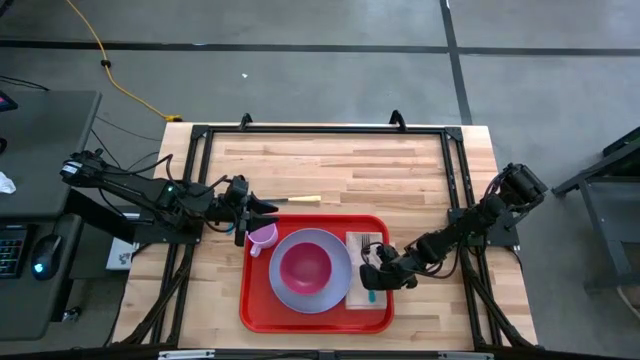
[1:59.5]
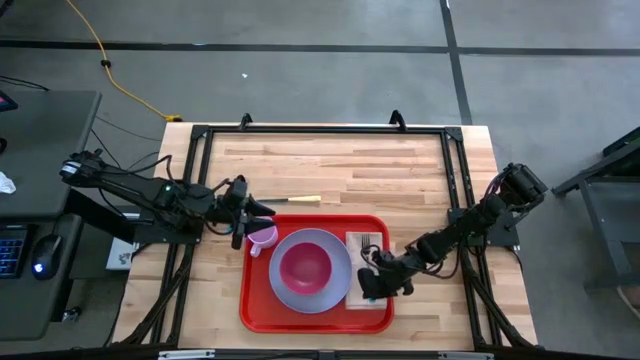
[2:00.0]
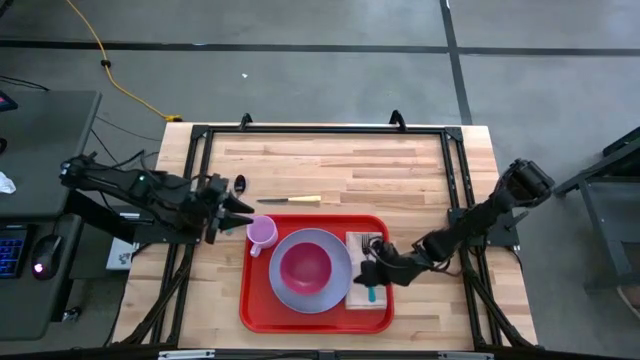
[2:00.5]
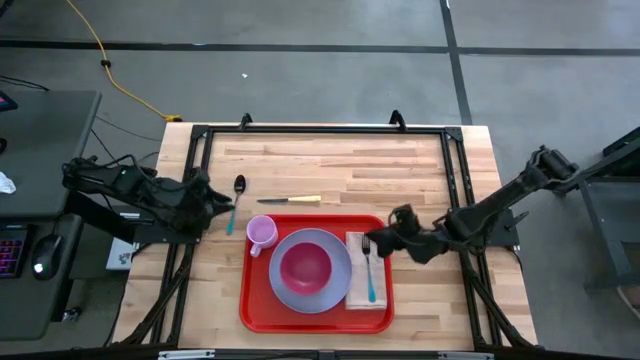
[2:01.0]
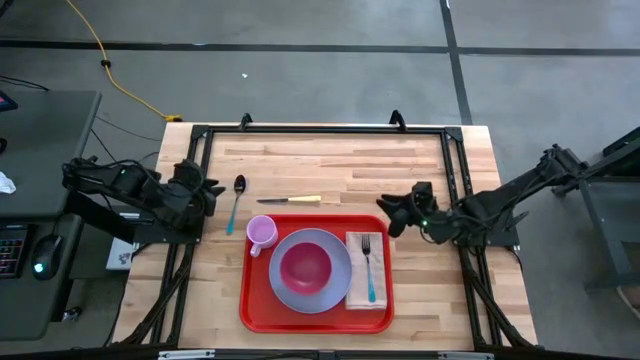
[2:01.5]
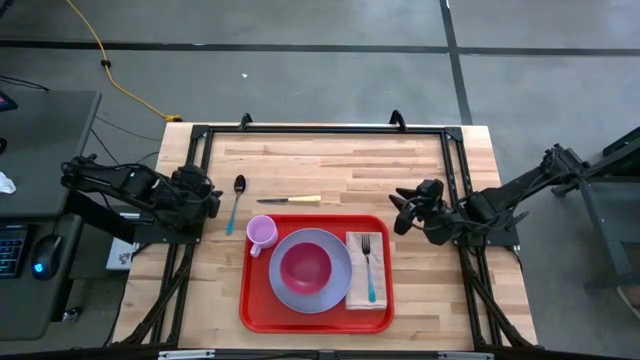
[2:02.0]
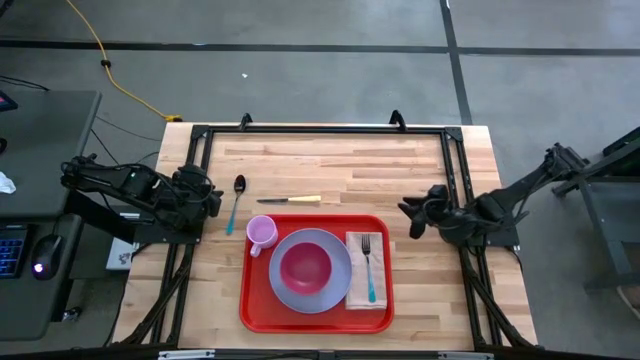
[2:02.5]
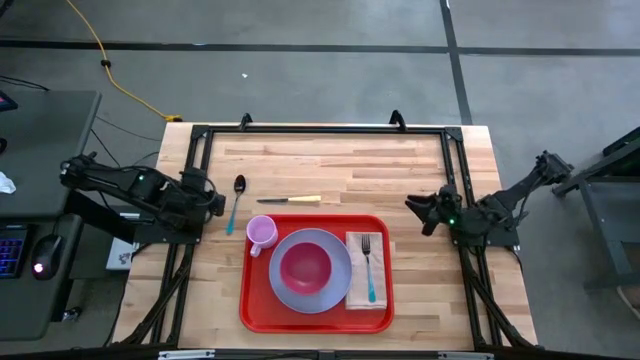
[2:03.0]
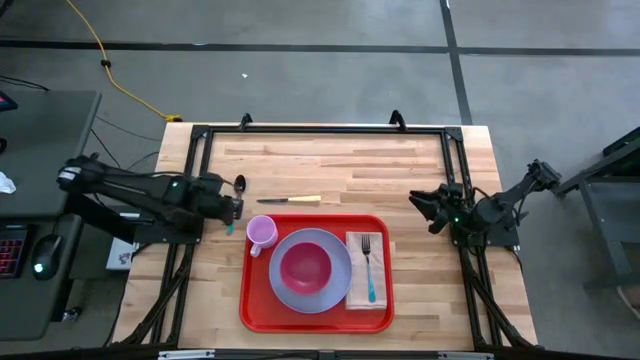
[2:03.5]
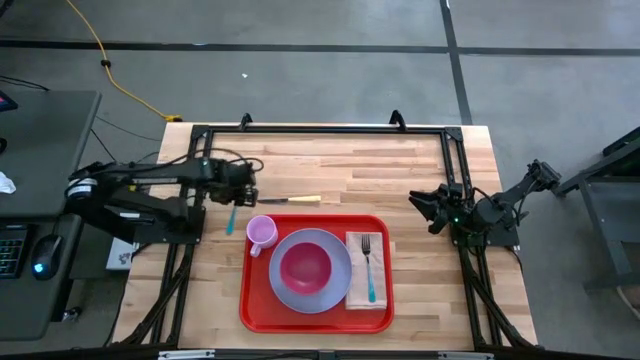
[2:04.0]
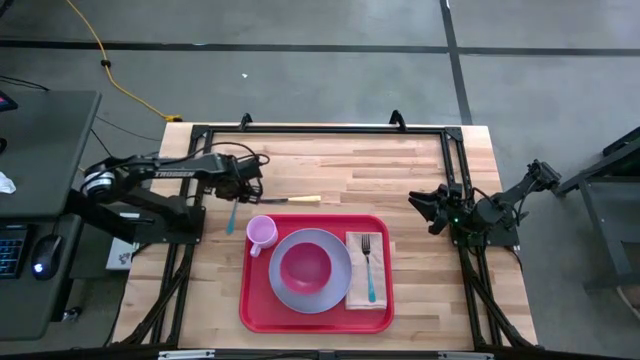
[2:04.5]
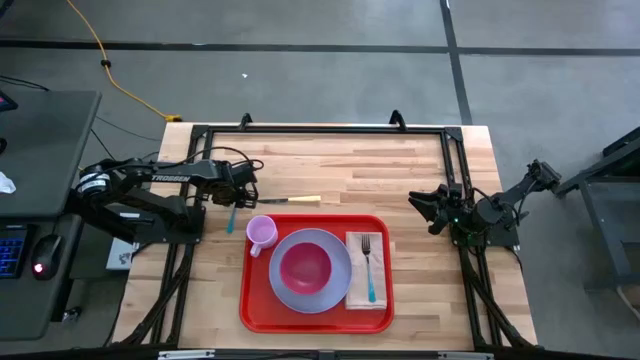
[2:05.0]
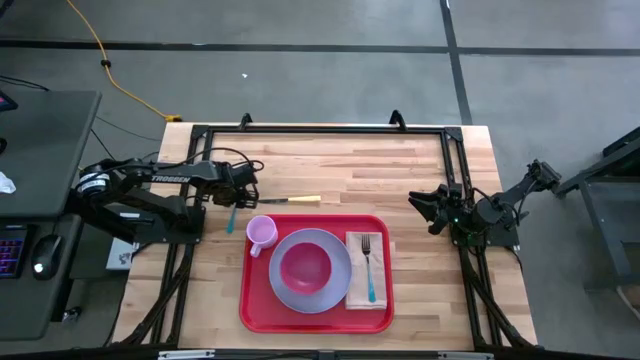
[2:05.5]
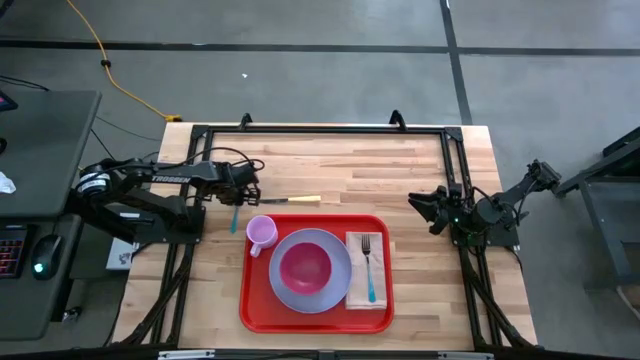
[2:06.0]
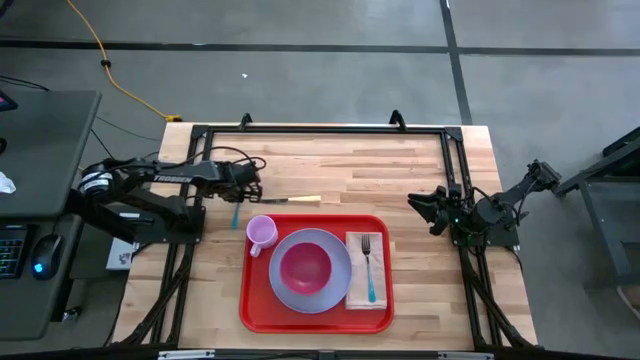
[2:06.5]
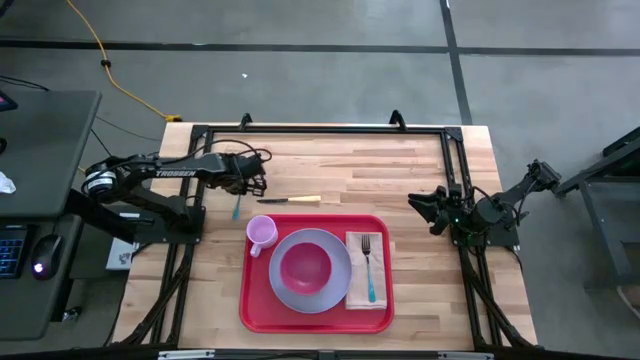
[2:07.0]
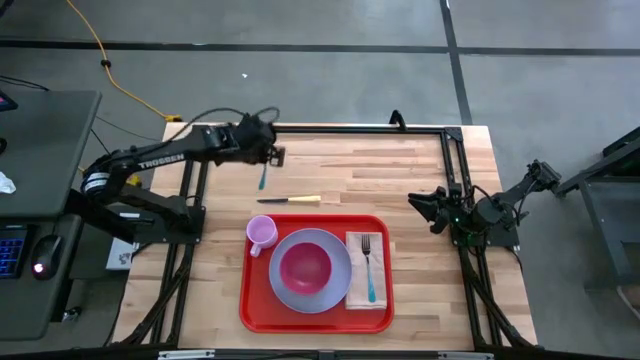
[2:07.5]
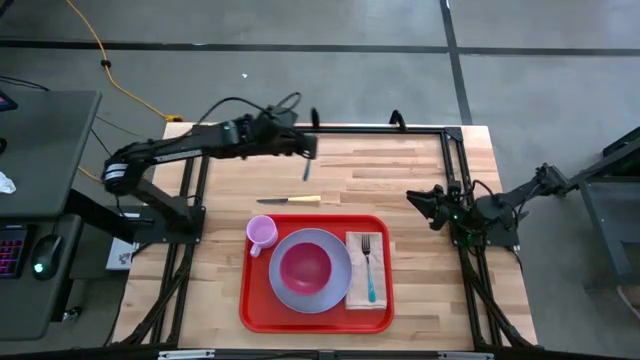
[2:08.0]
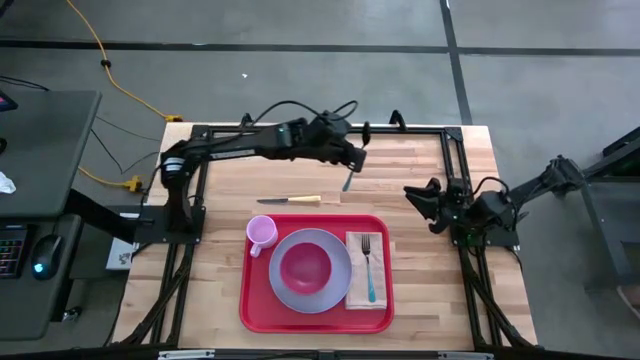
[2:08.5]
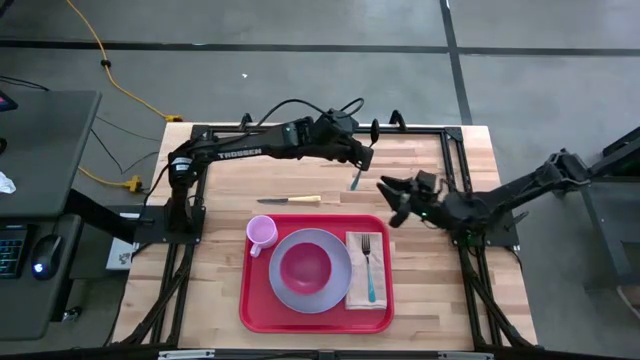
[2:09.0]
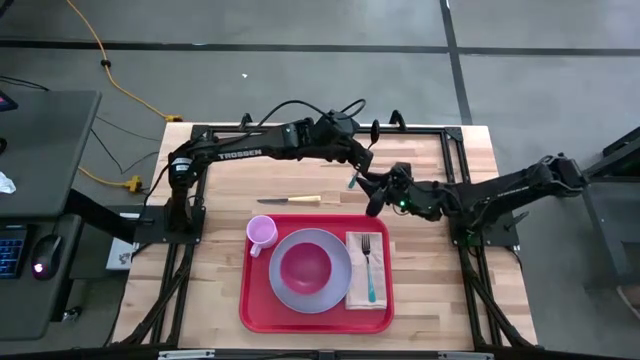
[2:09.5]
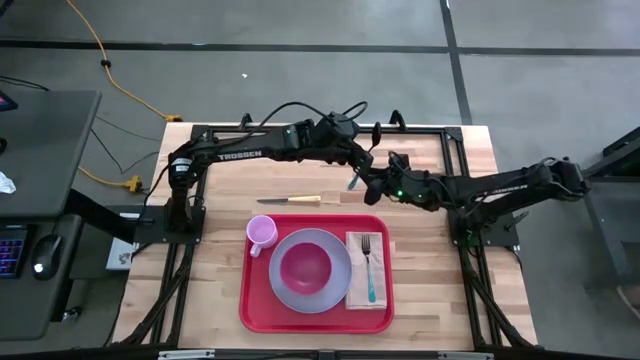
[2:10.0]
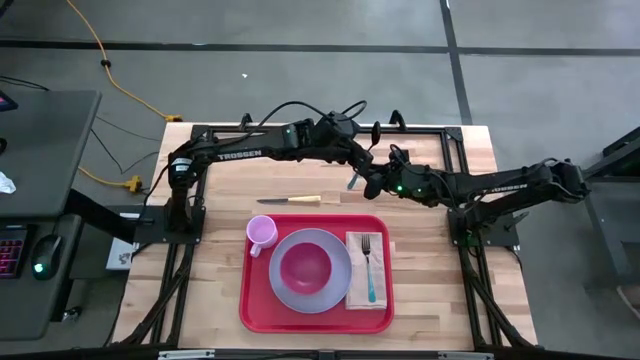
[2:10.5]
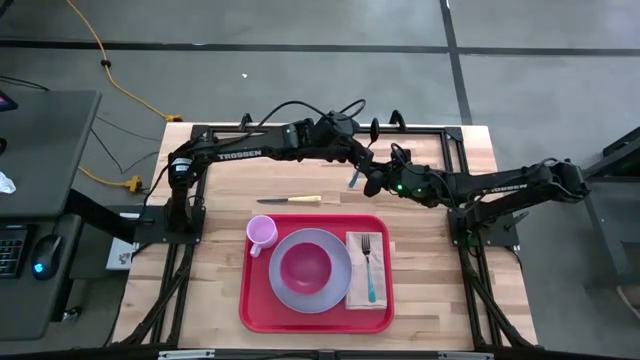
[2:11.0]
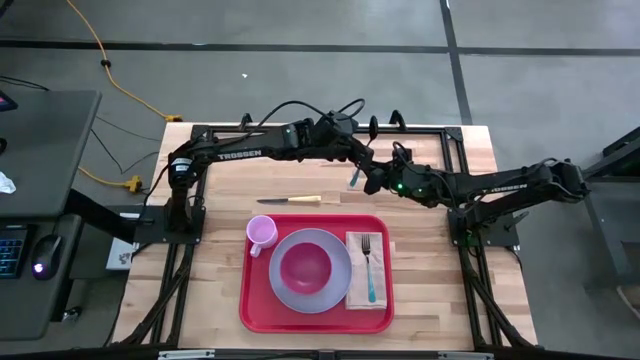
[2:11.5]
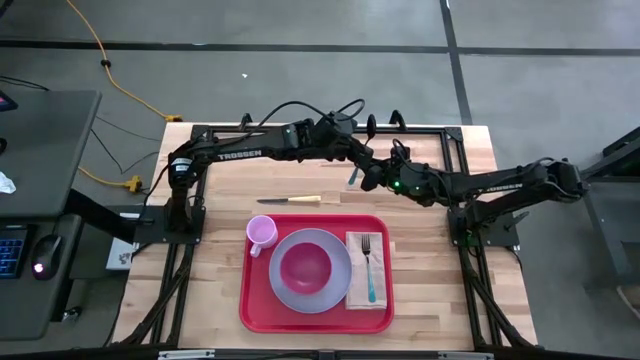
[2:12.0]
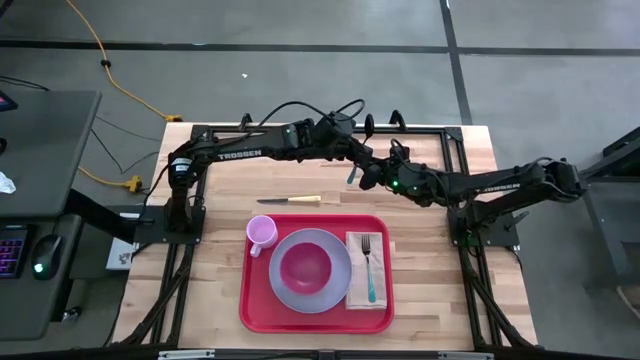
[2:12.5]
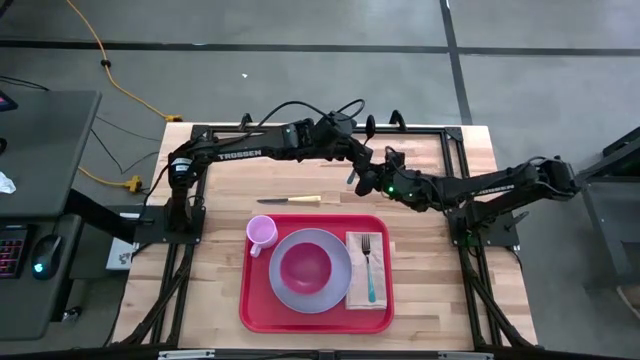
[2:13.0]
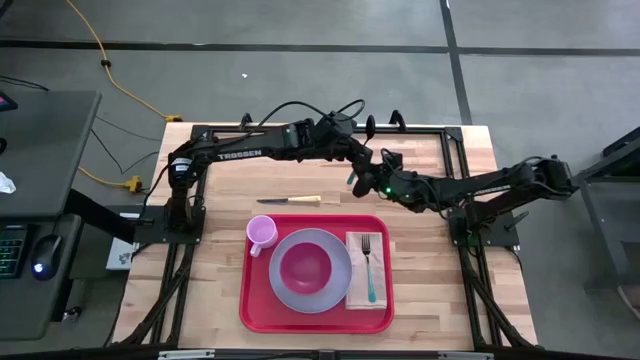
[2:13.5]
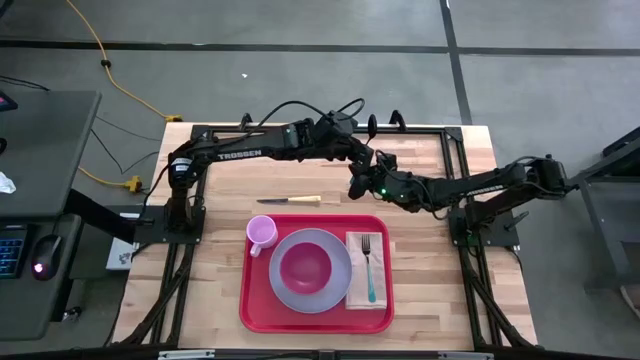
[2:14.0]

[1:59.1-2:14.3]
Task: Set up tray
Put the blue spoon on the brown napkin to the left of the blue fork

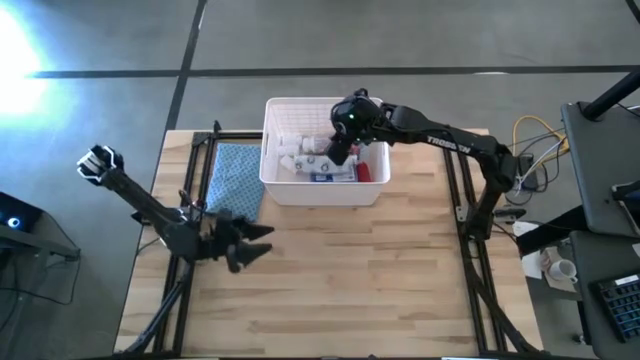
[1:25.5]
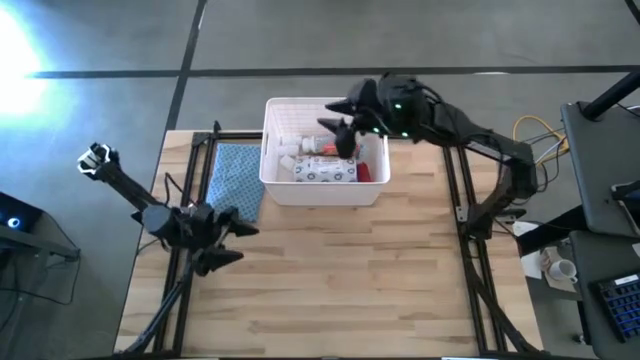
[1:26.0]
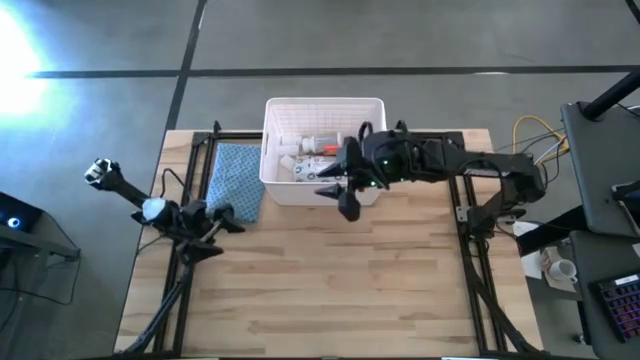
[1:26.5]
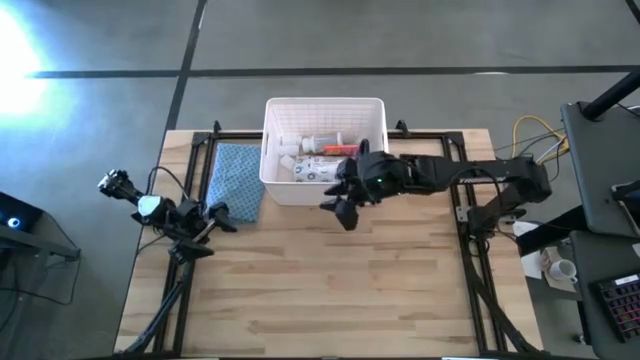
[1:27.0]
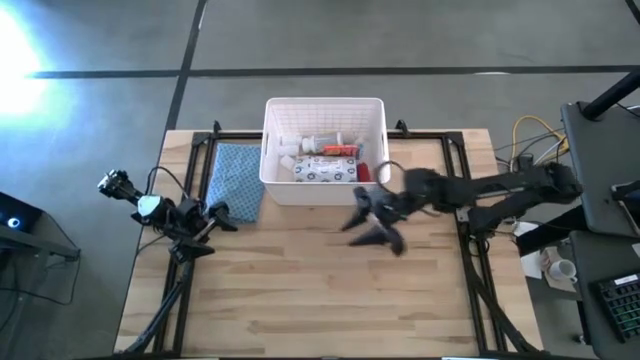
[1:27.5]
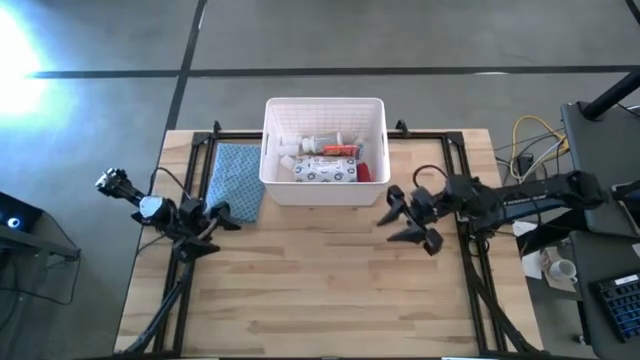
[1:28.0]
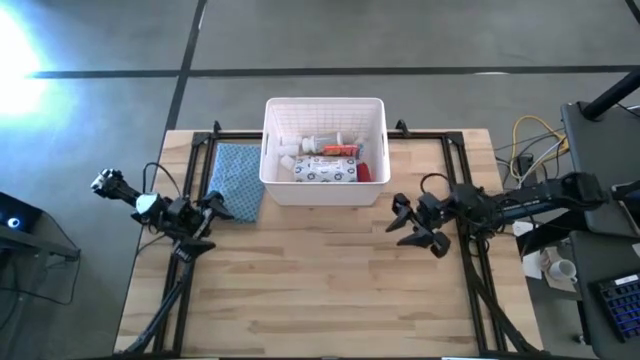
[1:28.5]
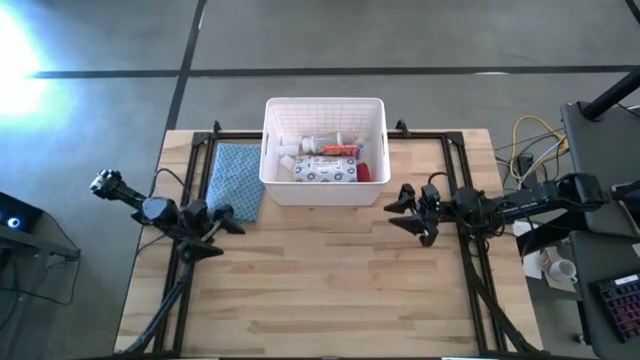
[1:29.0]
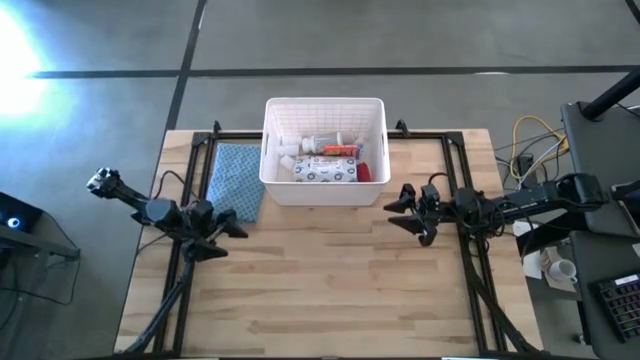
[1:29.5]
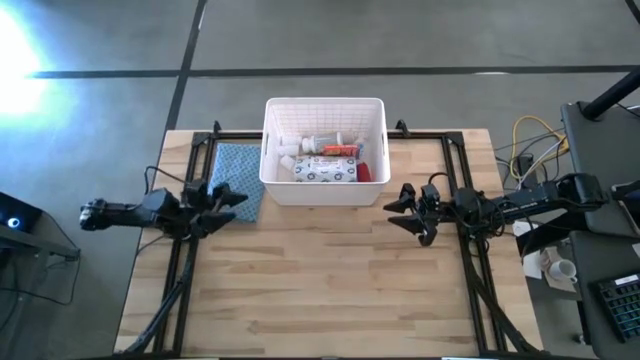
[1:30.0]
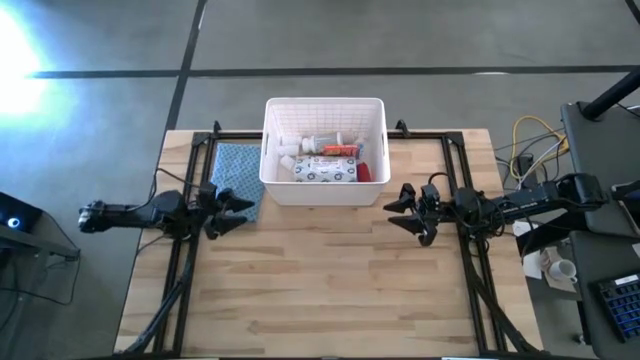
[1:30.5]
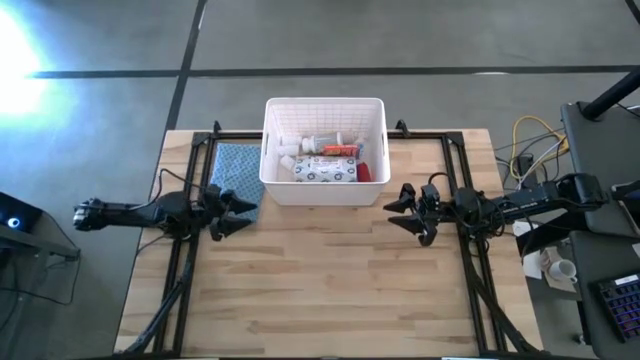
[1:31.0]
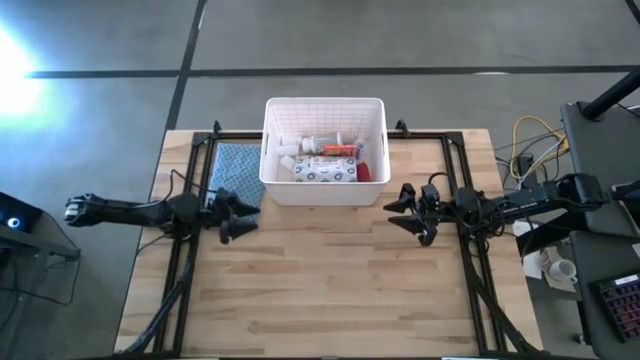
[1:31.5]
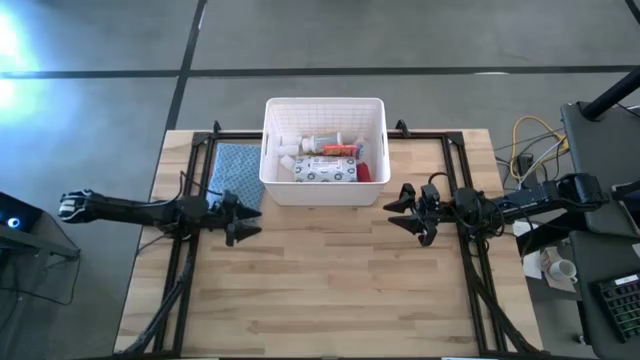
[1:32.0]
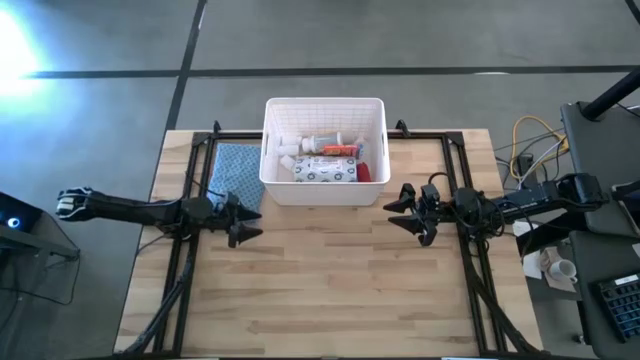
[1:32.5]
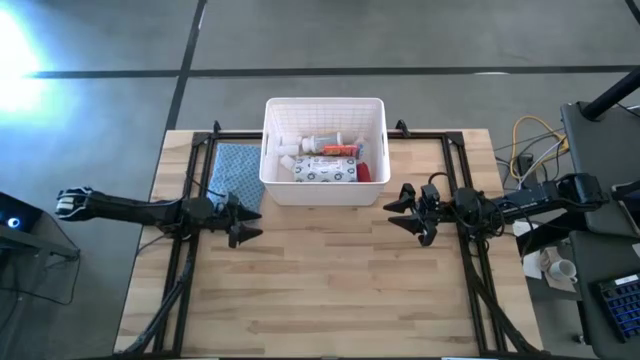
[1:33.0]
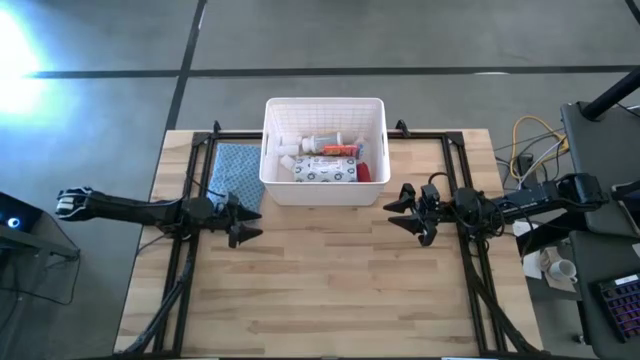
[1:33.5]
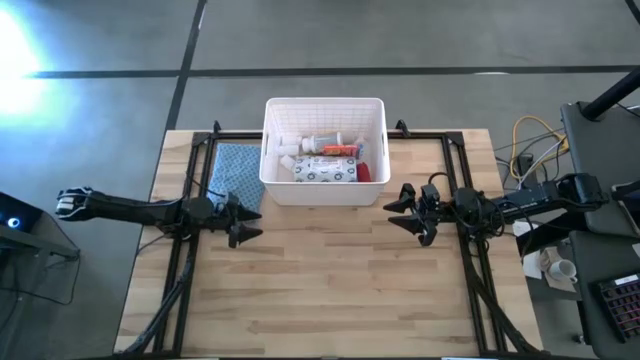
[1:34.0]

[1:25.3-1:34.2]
Task: Pick & place medical supplies in basket/bin
Return to Home Position
